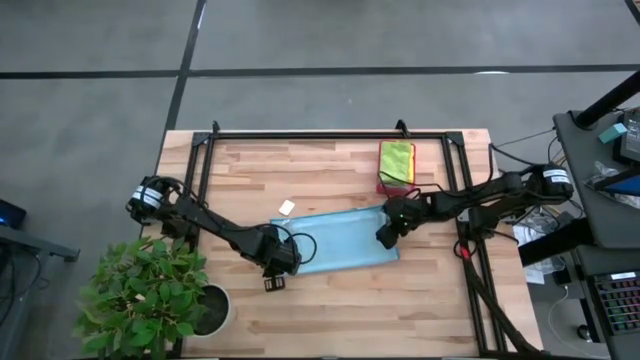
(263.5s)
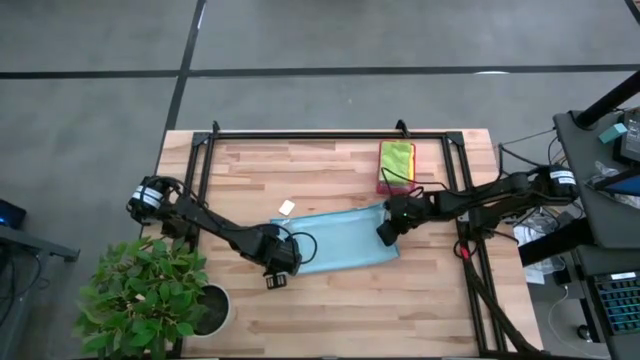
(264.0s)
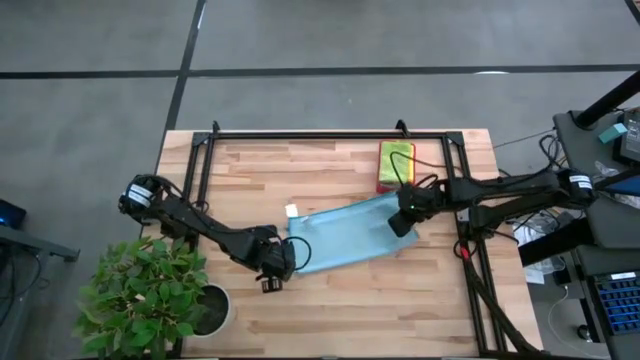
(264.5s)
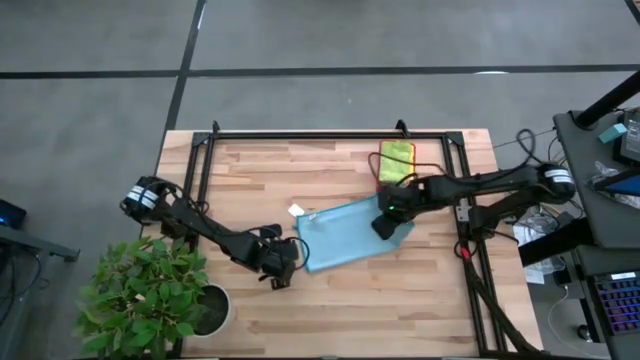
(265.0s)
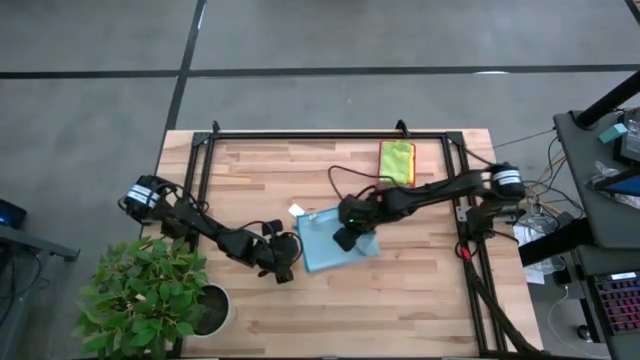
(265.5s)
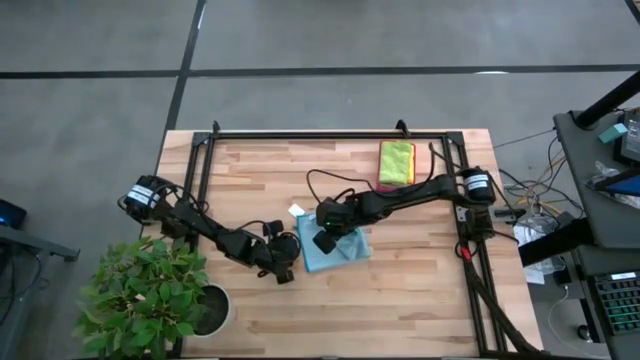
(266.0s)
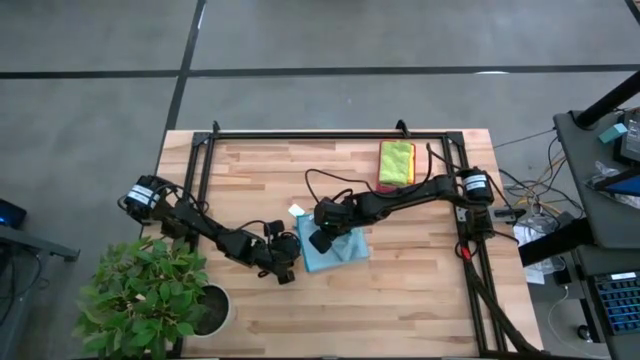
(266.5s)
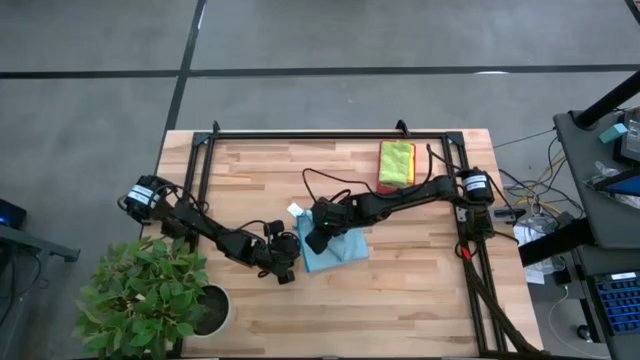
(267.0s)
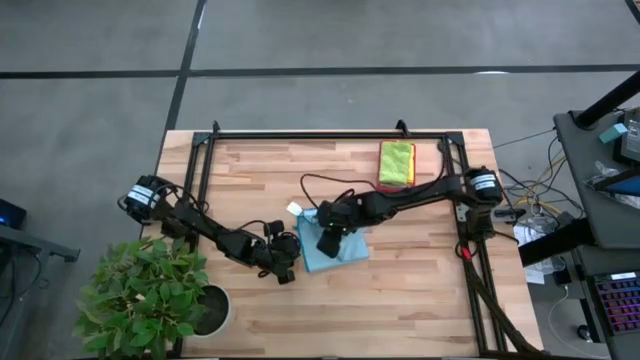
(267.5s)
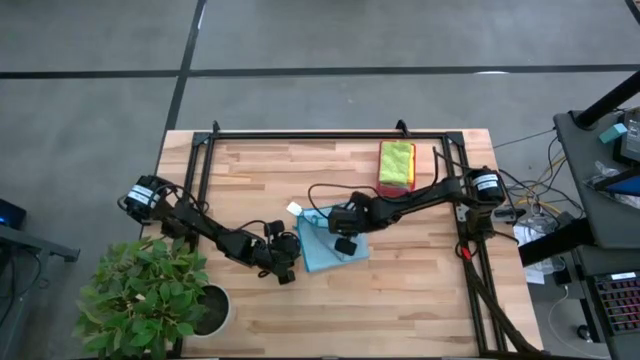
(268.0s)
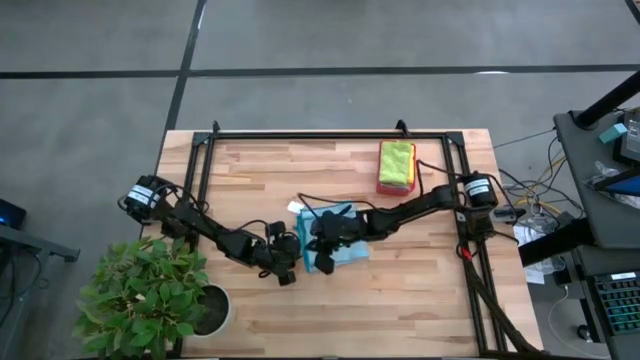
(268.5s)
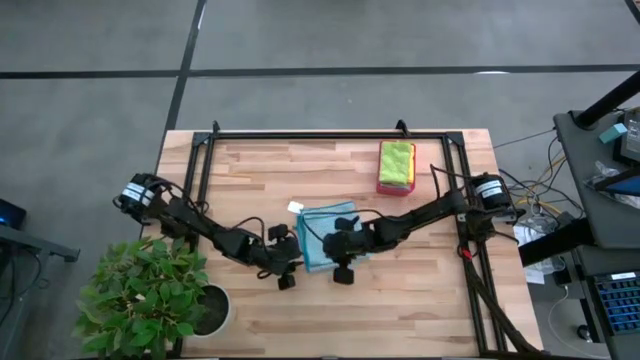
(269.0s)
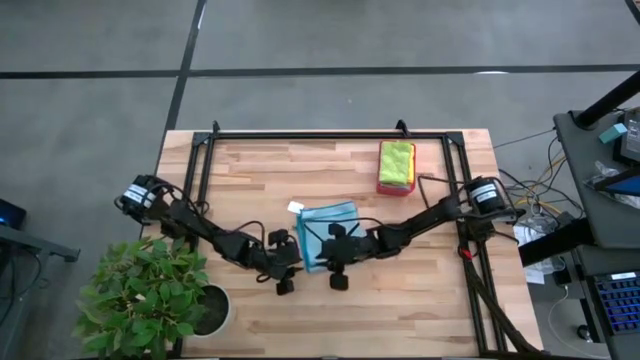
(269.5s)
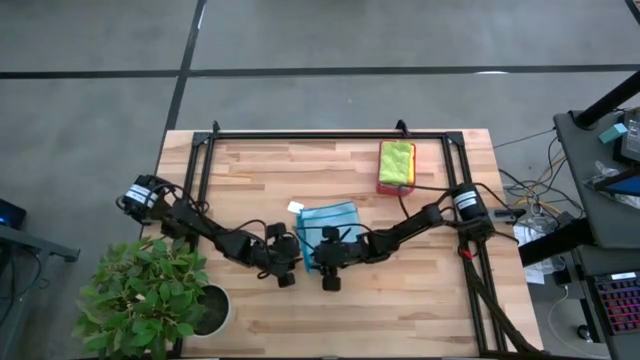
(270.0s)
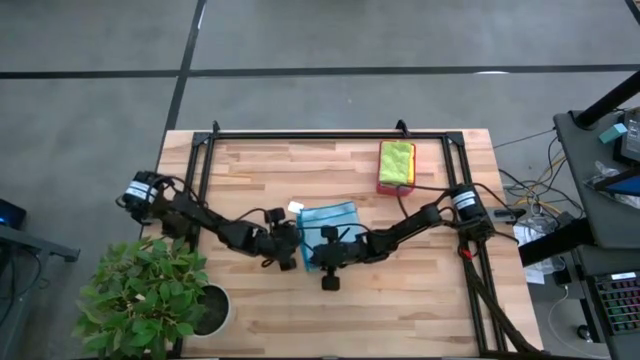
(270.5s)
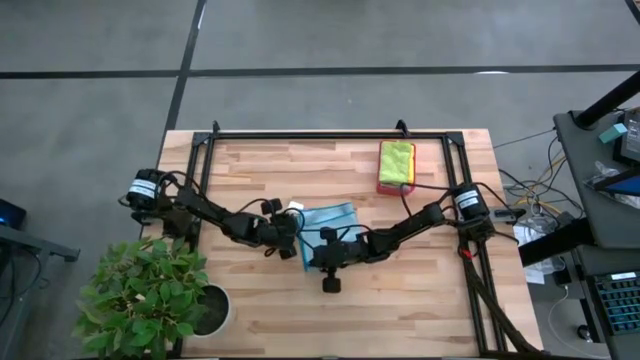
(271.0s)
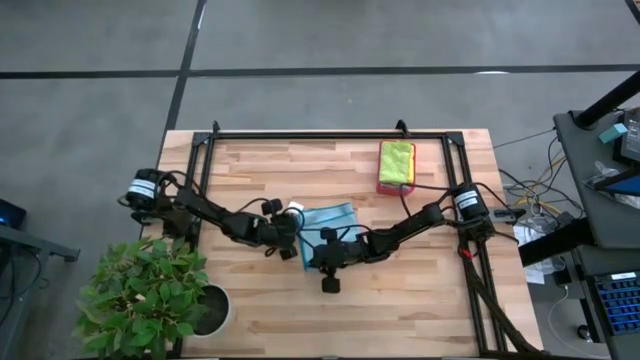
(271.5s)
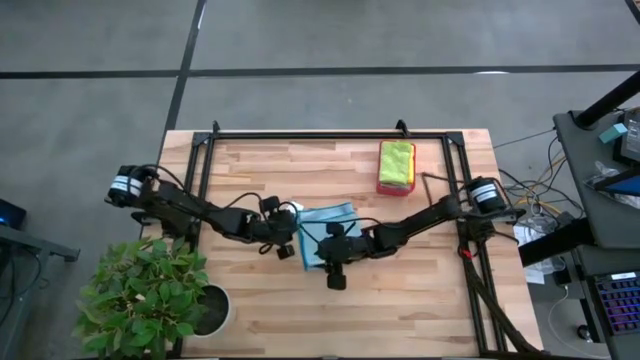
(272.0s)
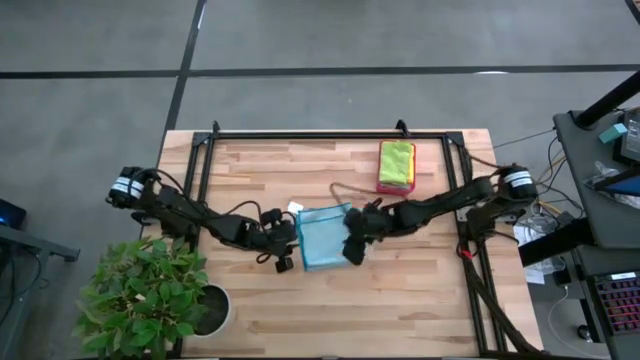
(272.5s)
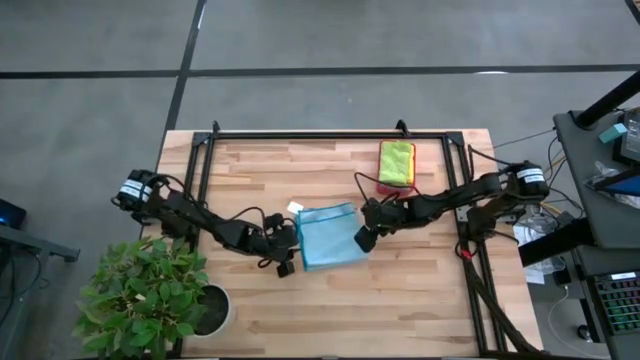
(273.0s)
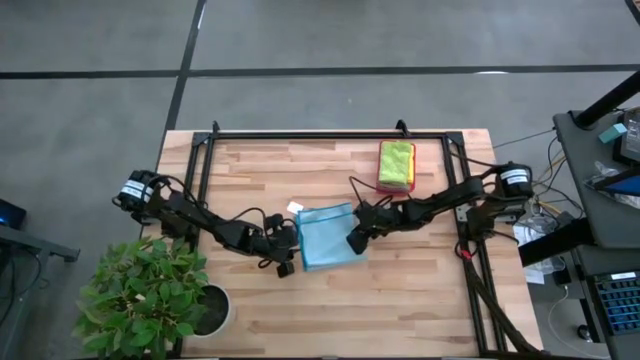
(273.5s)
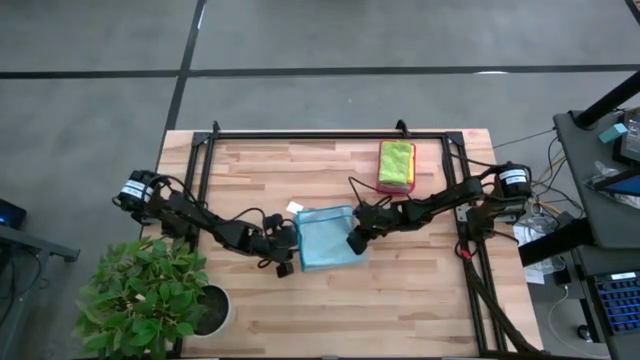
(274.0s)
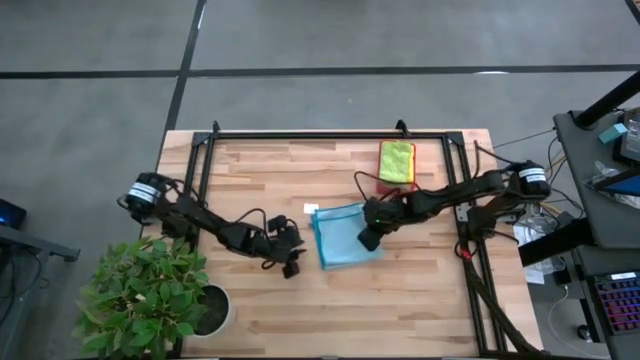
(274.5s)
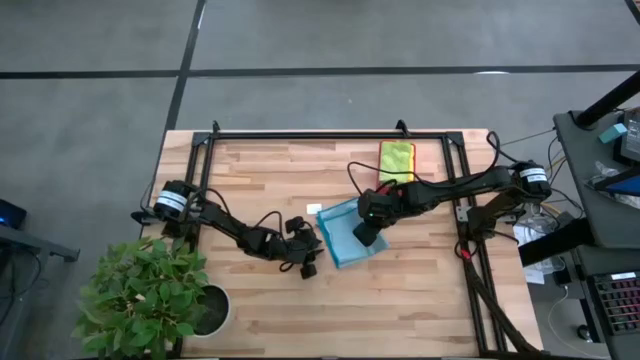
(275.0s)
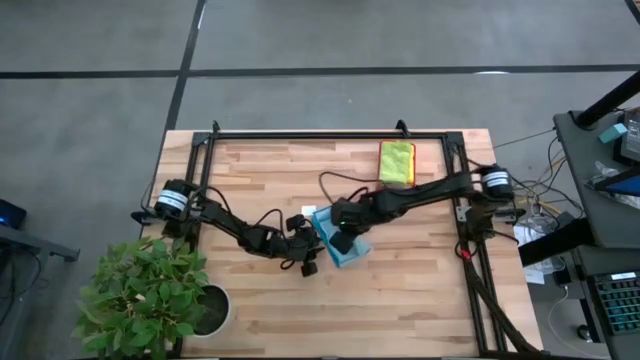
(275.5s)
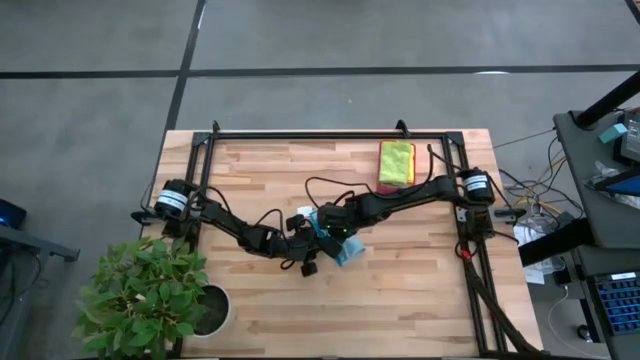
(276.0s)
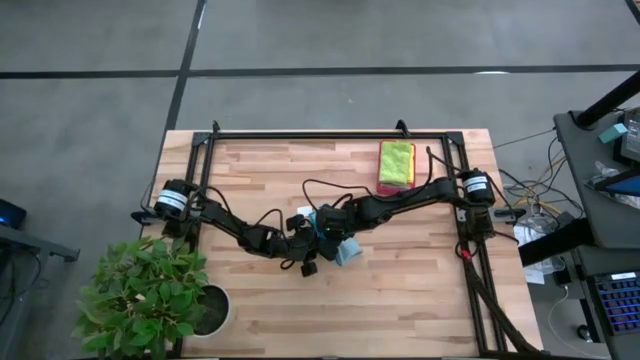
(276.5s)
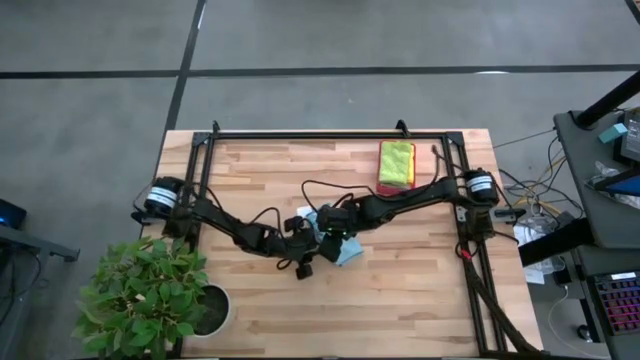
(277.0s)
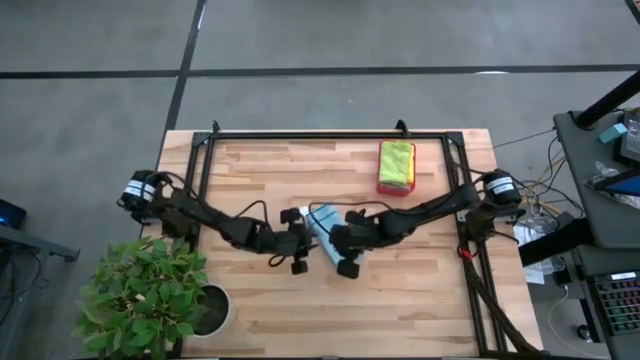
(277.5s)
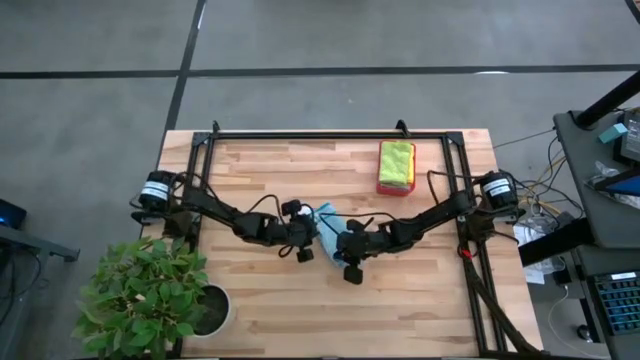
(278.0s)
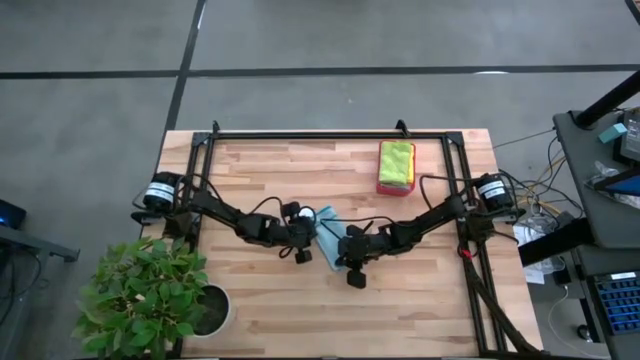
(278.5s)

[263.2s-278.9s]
Task: Fold microfiber towels
Fold the blue microfiber towel

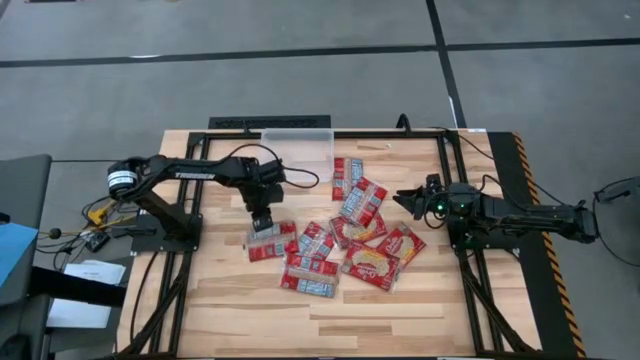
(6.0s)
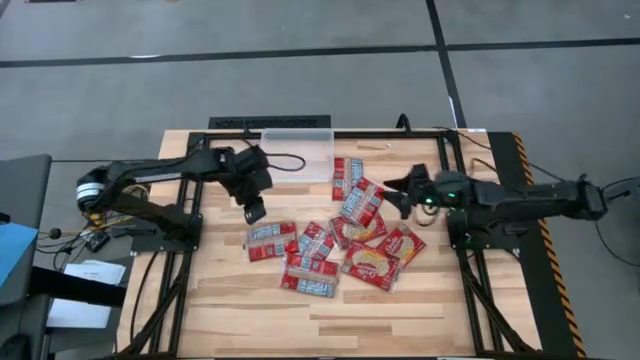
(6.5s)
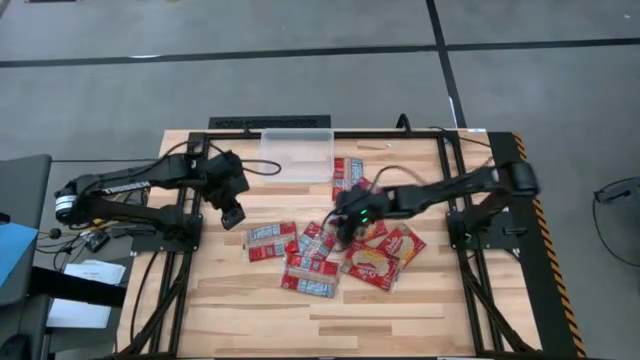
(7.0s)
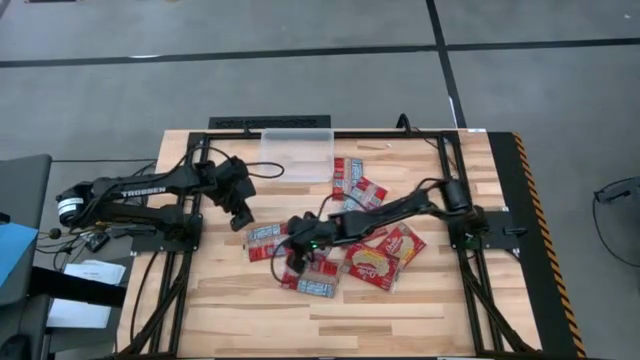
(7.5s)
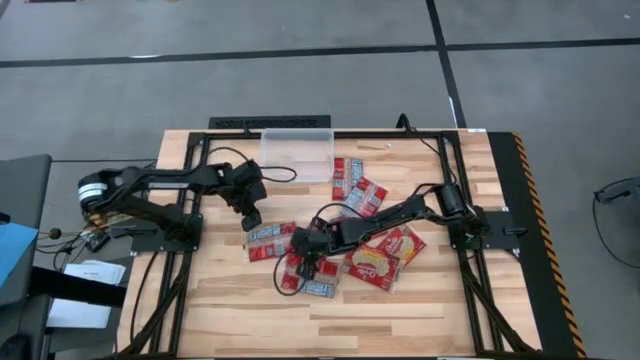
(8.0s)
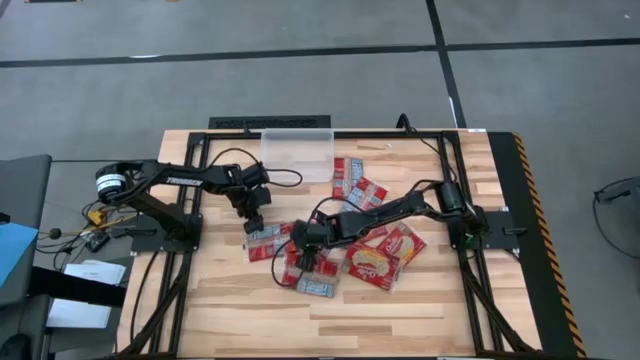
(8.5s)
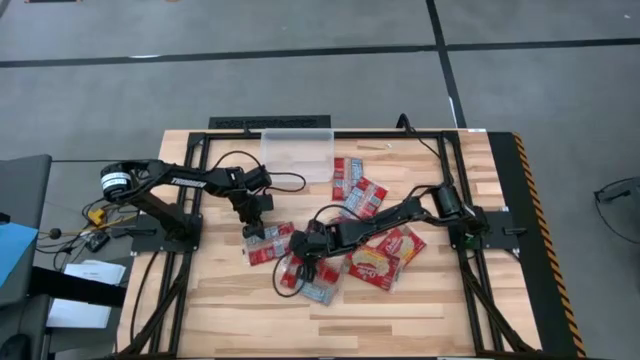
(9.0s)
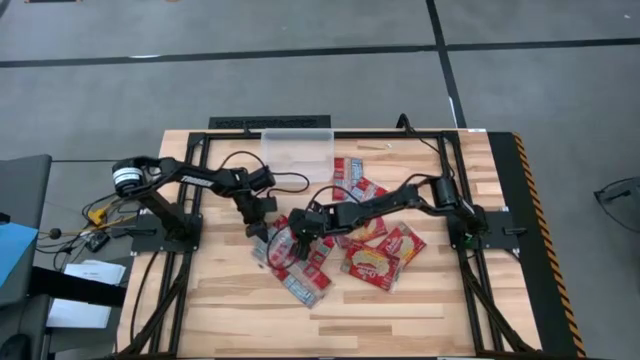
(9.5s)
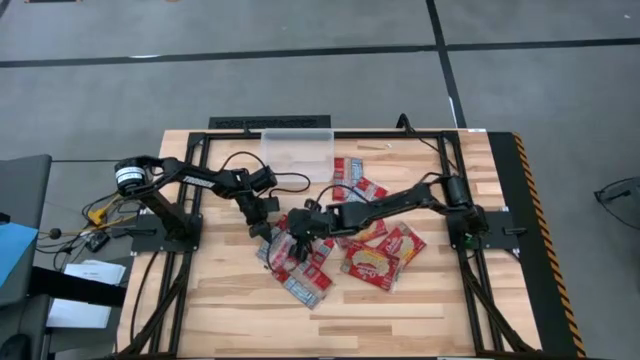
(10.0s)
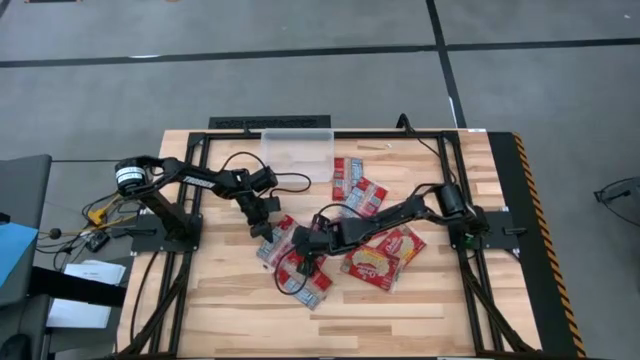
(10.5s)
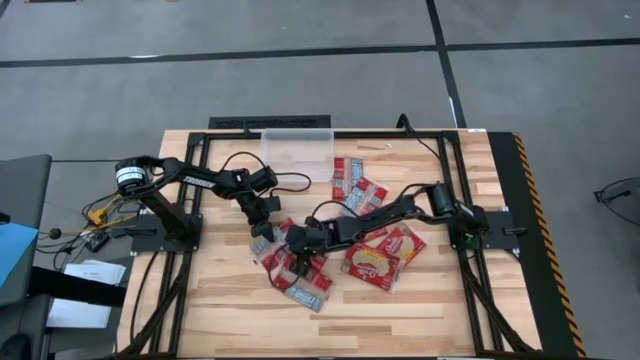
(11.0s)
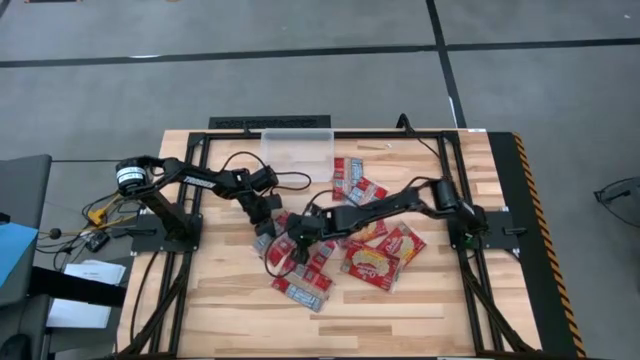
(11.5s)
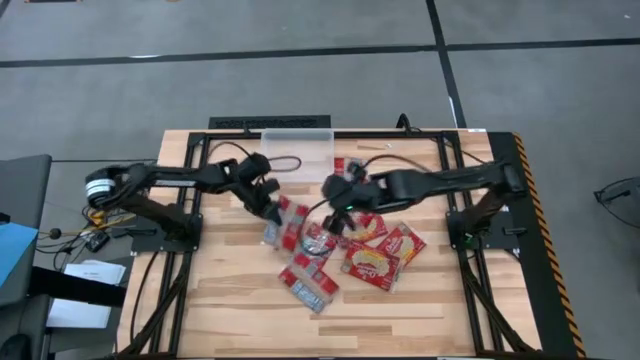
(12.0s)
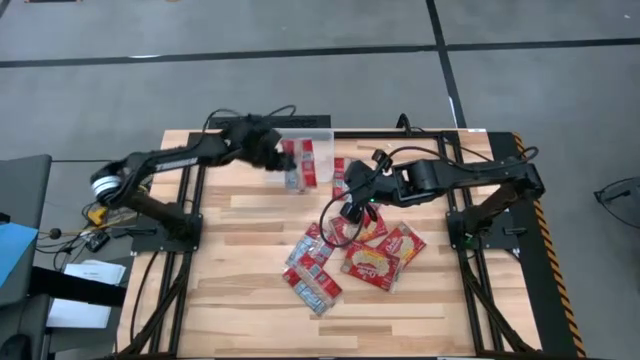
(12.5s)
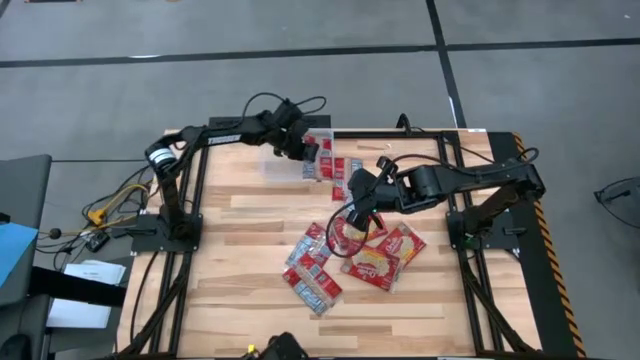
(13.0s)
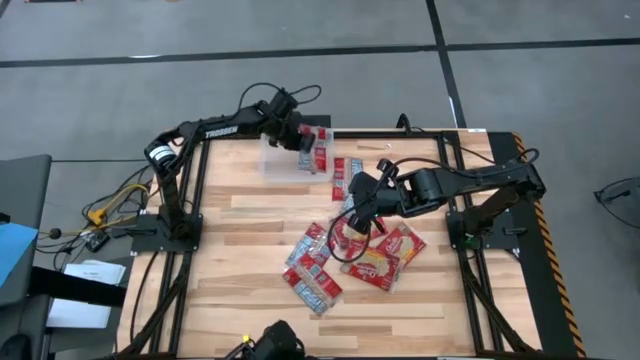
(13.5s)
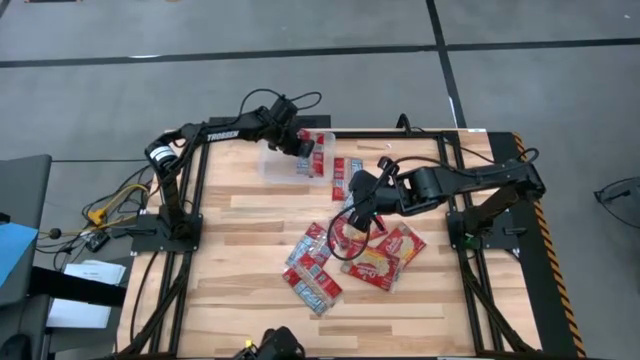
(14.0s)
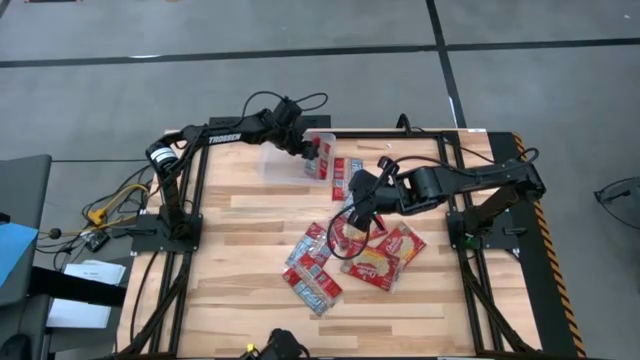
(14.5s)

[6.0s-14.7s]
Task: Sort popcorn bags into baskets
Put the red popcorn bag into the transparent bin
